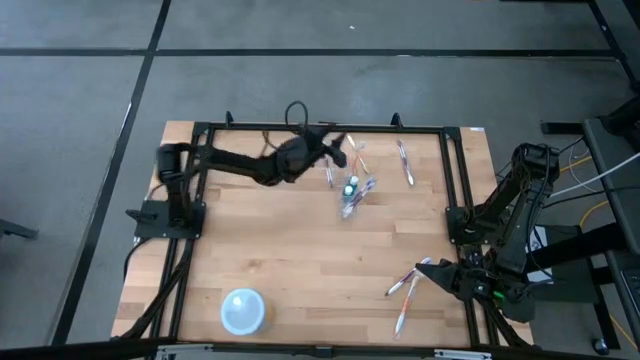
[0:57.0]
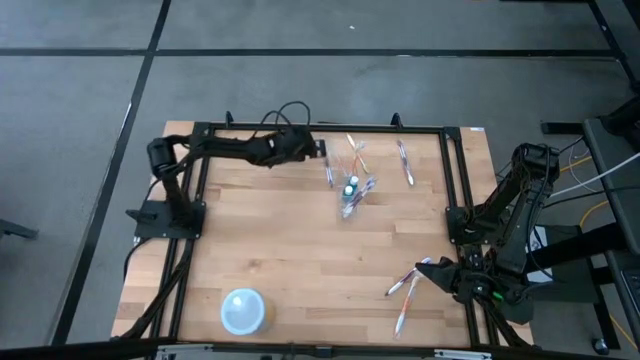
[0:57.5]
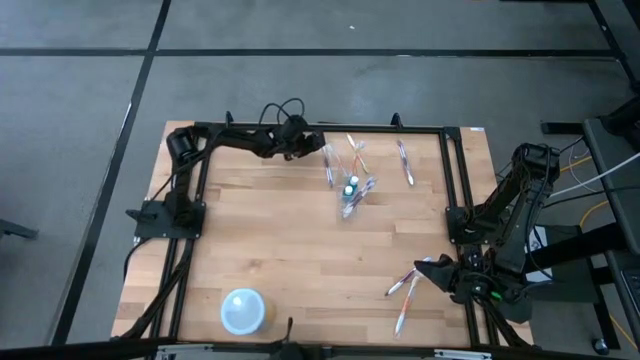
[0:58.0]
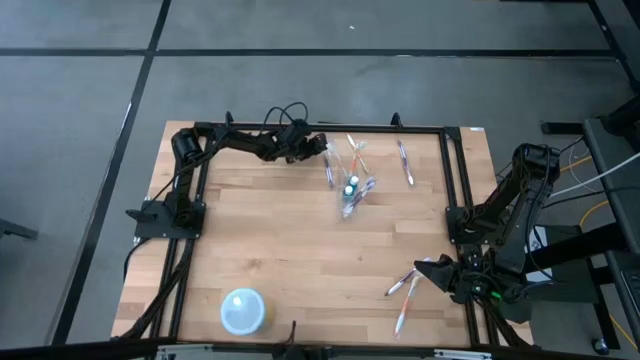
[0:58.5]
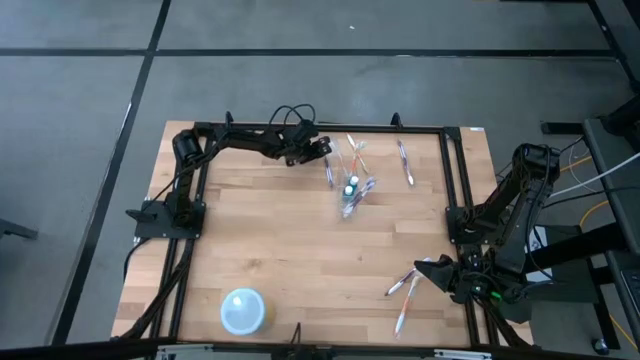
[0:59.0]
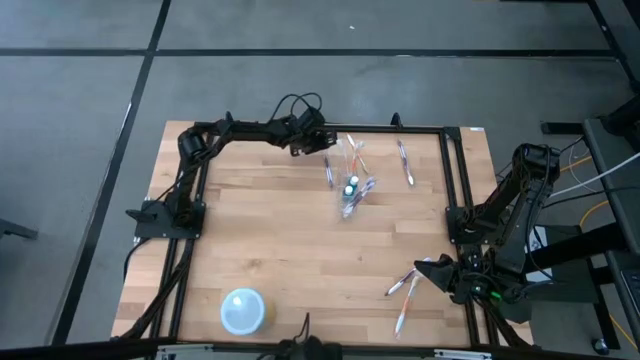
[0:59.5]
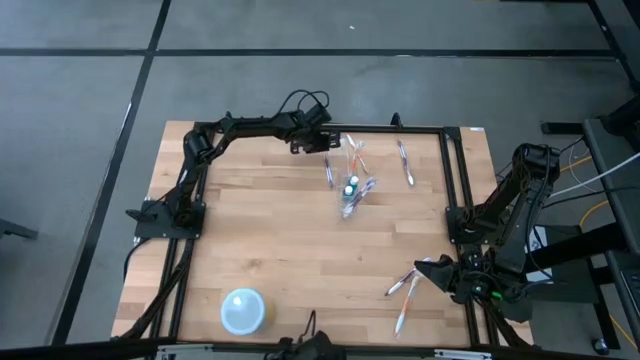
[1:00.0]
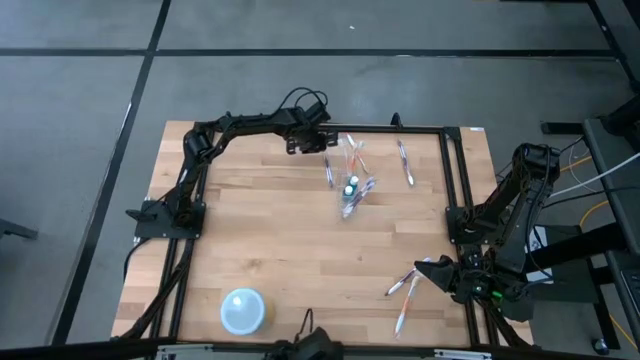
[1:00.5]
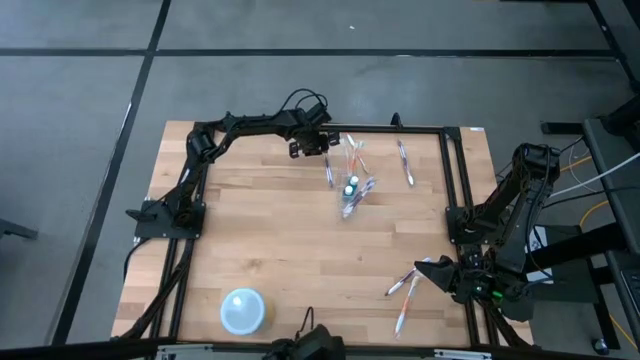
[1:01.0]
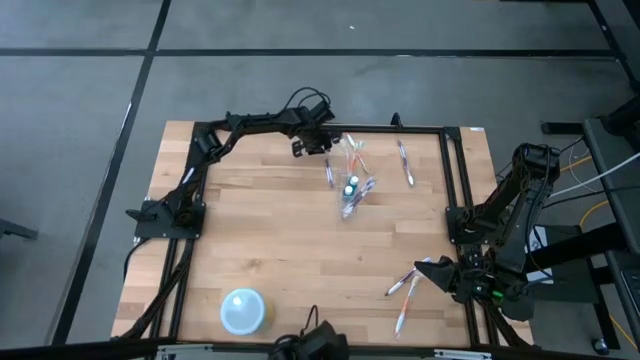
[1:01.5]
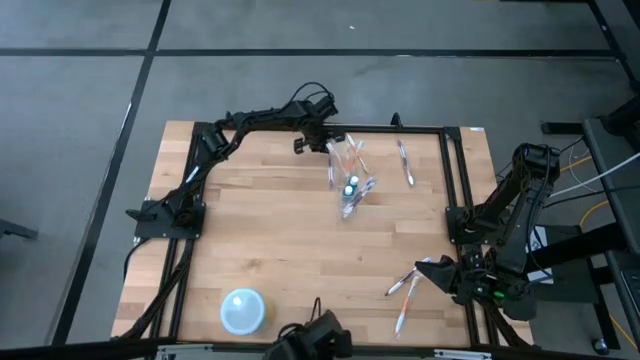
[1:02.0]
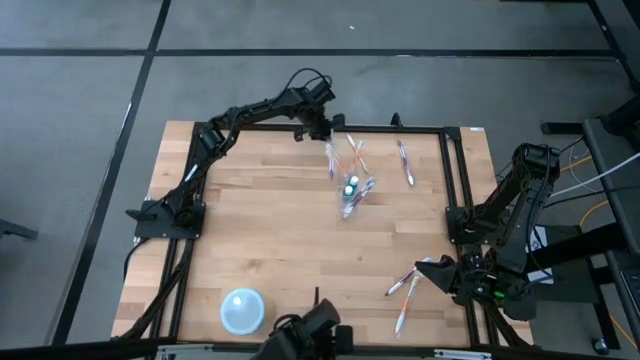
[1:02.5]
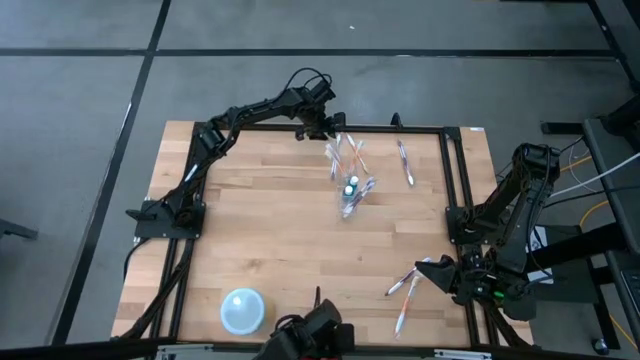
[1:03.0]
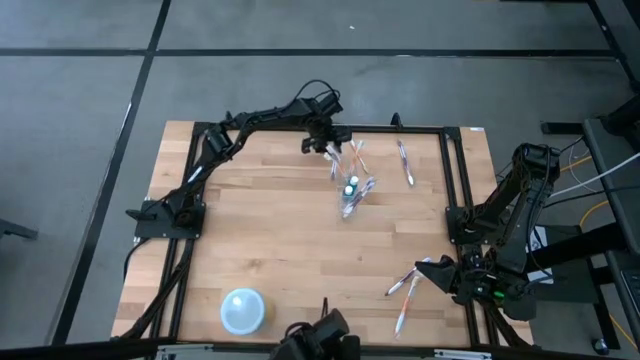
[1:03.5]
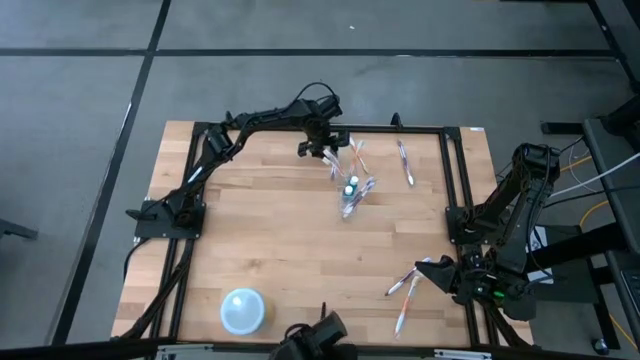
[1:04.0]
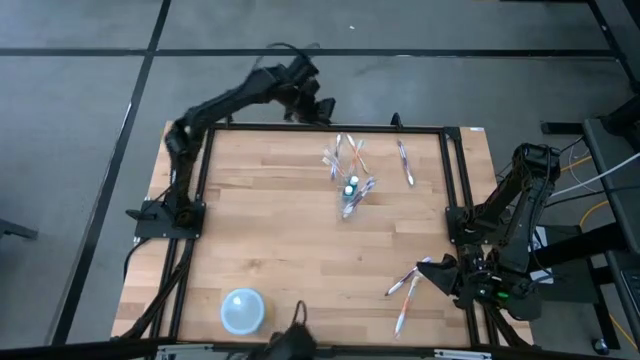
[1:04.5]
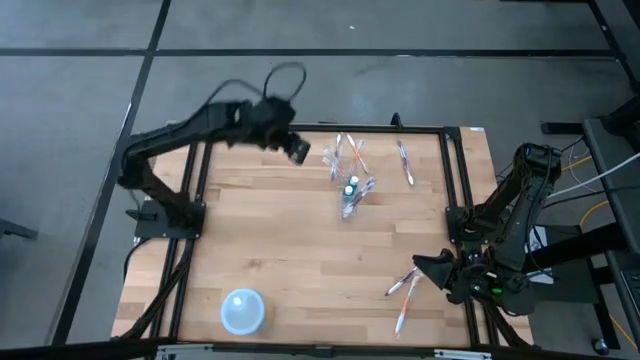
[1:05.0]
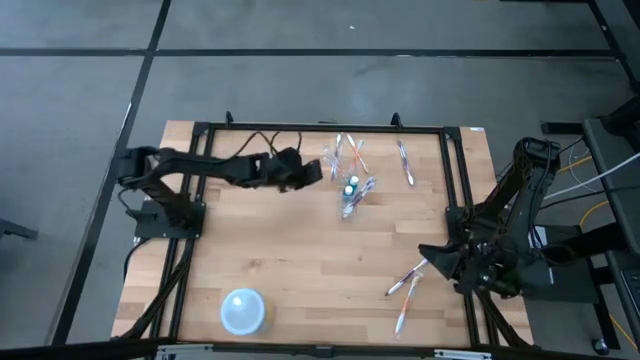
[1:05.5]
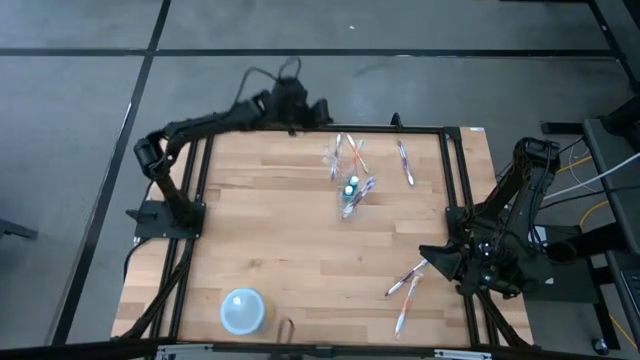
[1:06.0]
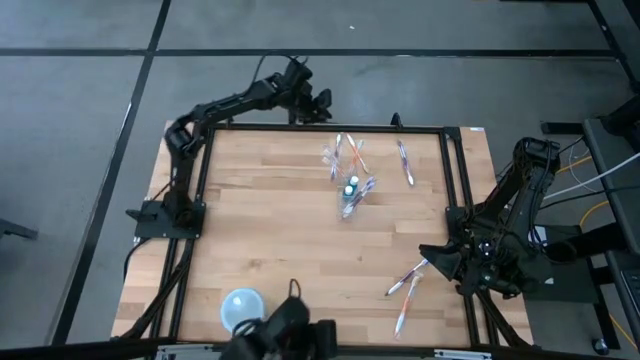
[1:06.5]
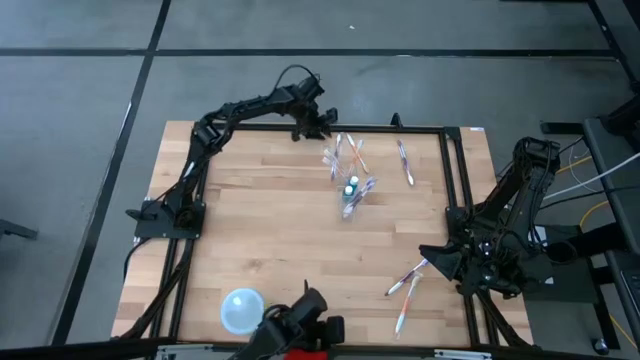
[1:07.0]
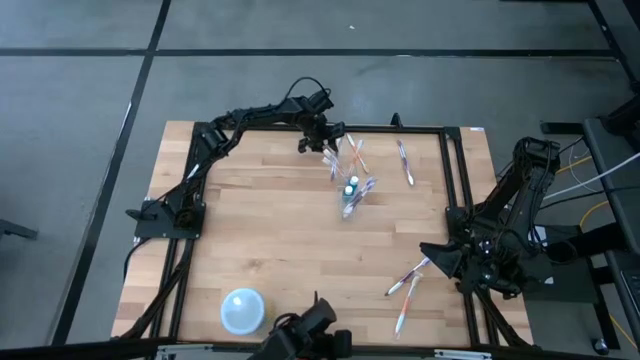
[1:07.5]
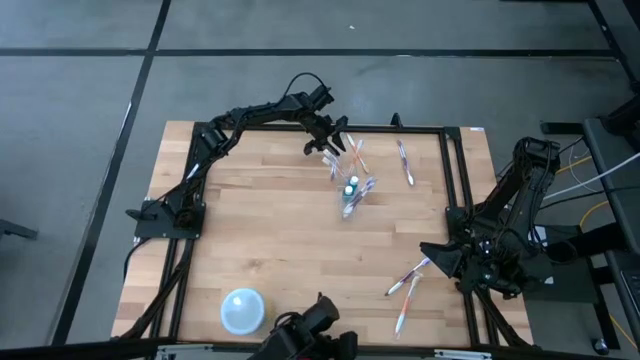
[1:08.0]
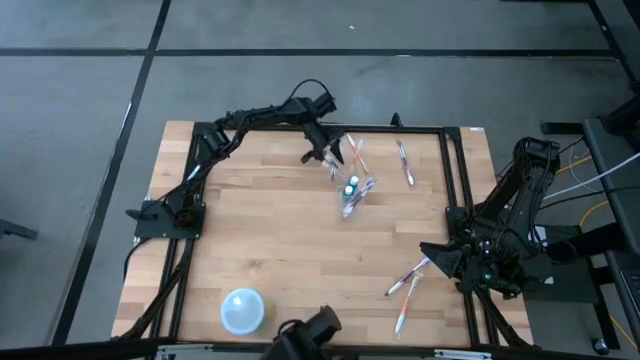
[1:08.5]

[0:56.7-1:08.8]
Task: Pick & Place toothbrushing station
Put the purple toothbrush into the transparent organizer

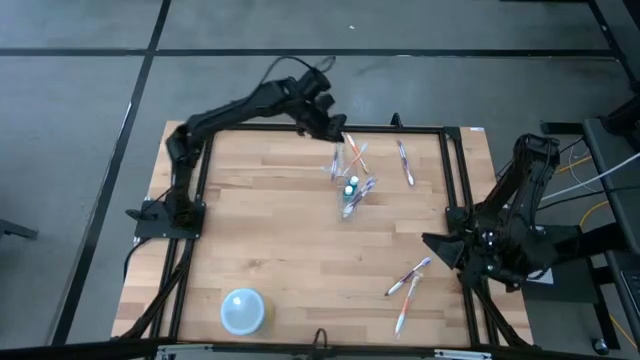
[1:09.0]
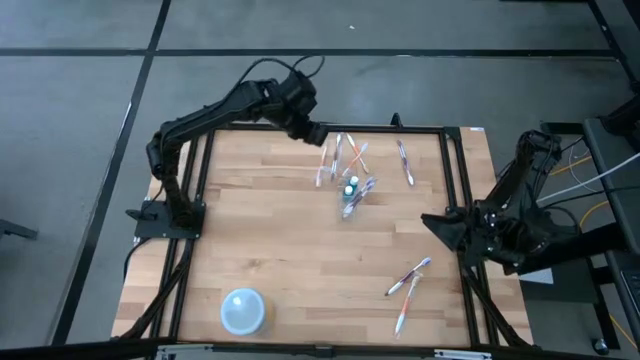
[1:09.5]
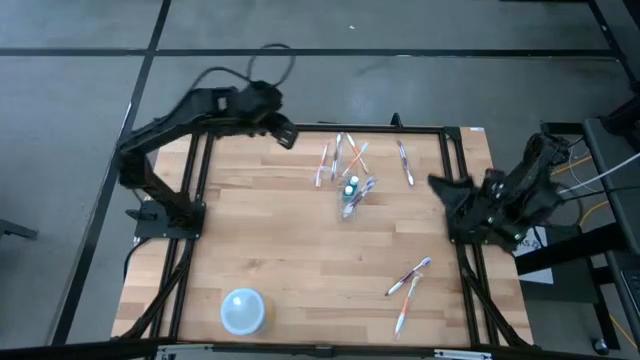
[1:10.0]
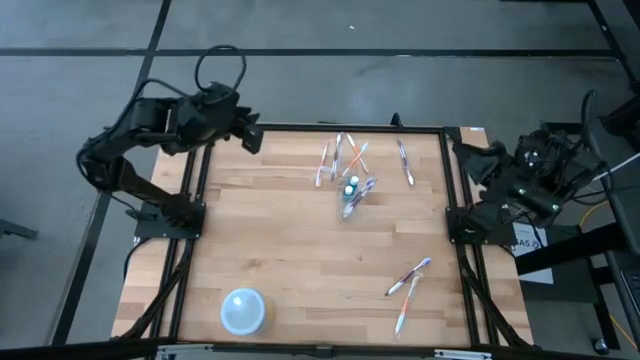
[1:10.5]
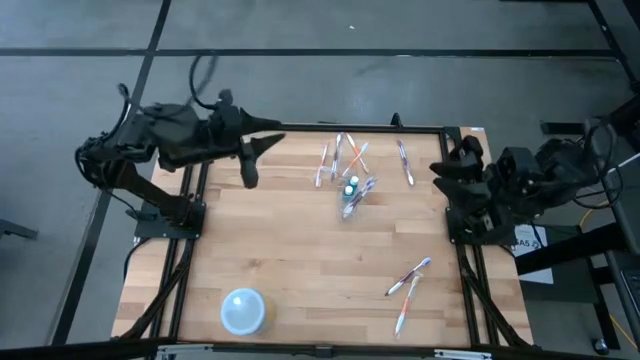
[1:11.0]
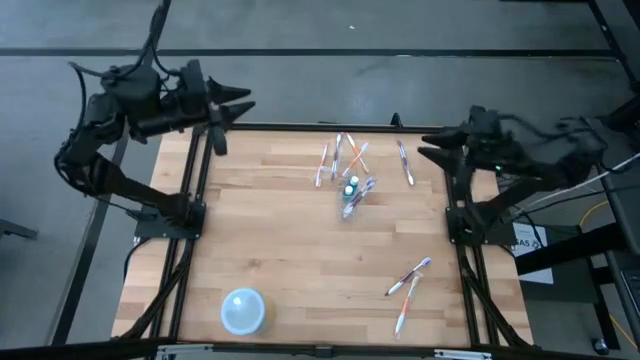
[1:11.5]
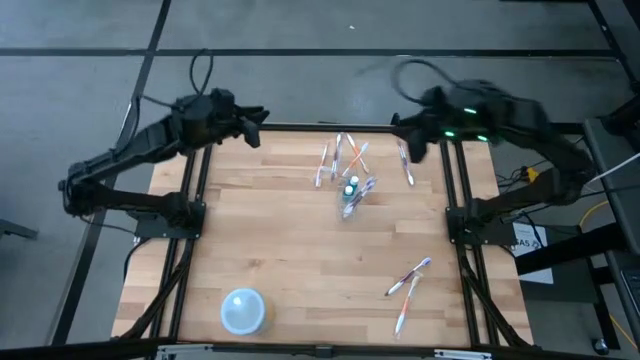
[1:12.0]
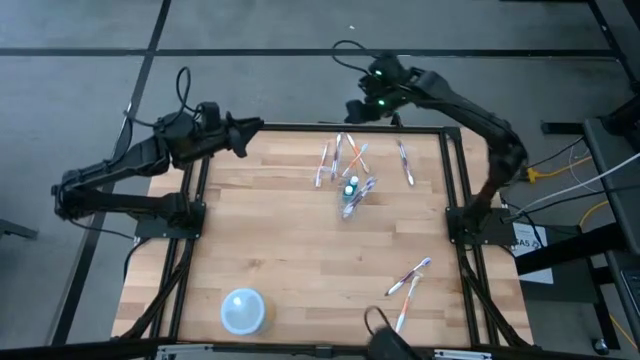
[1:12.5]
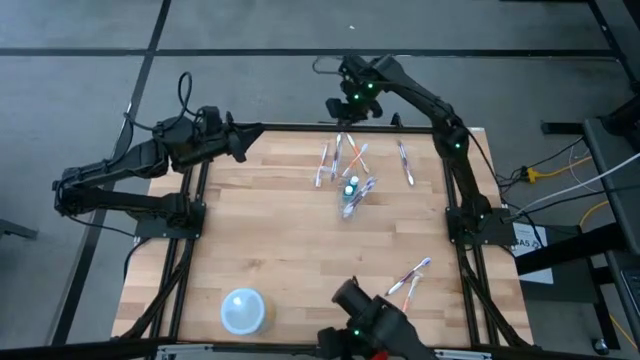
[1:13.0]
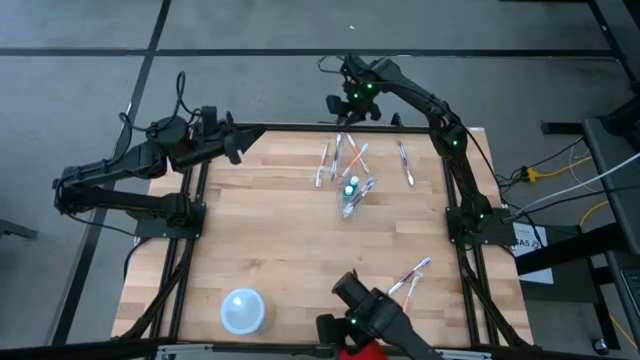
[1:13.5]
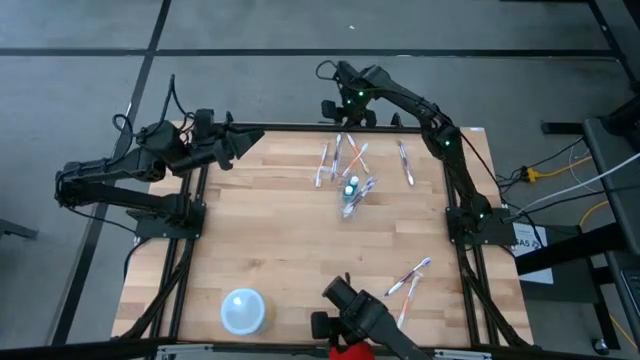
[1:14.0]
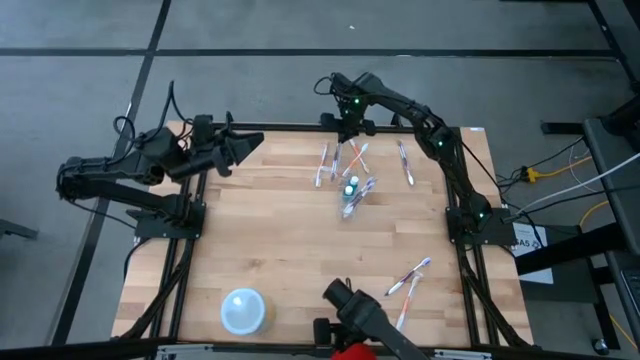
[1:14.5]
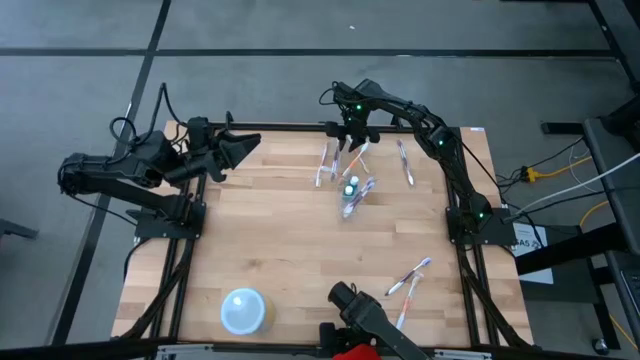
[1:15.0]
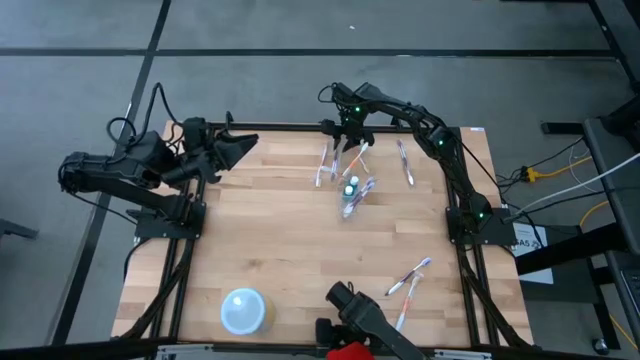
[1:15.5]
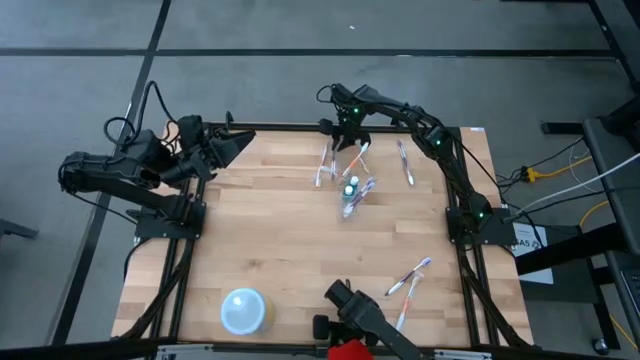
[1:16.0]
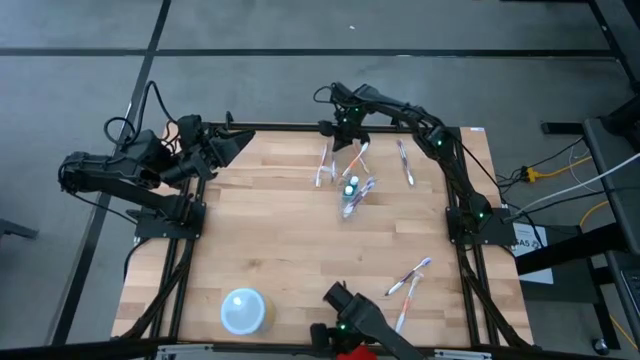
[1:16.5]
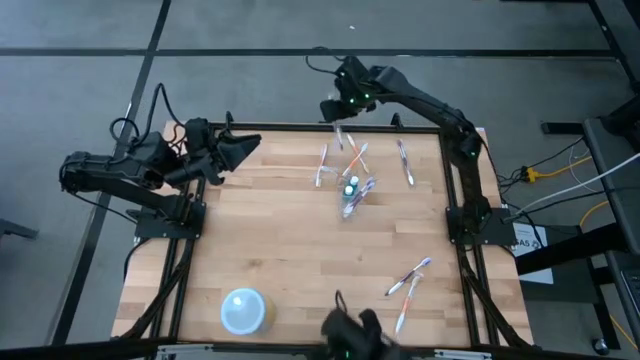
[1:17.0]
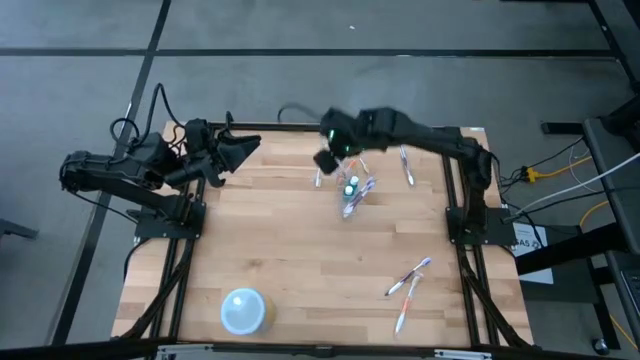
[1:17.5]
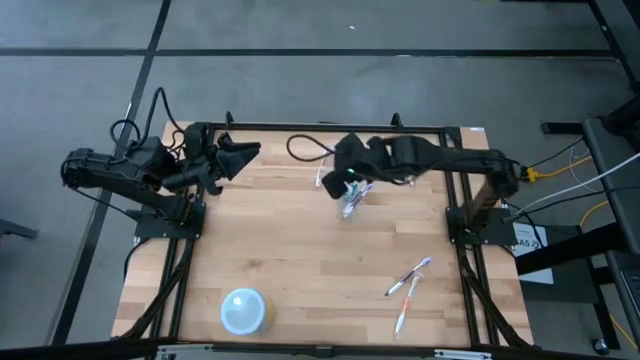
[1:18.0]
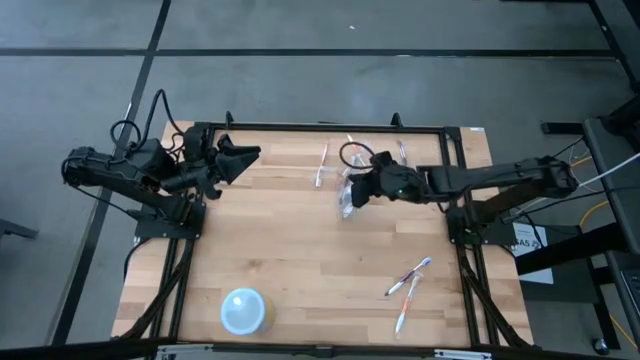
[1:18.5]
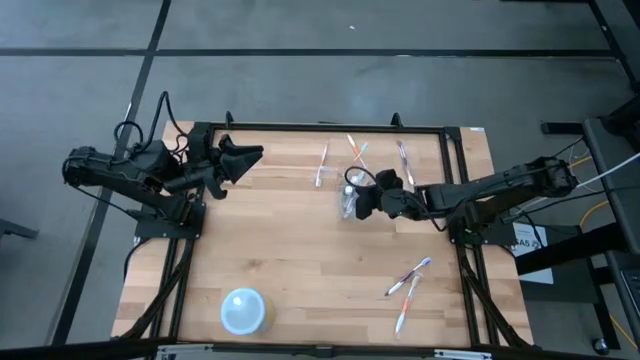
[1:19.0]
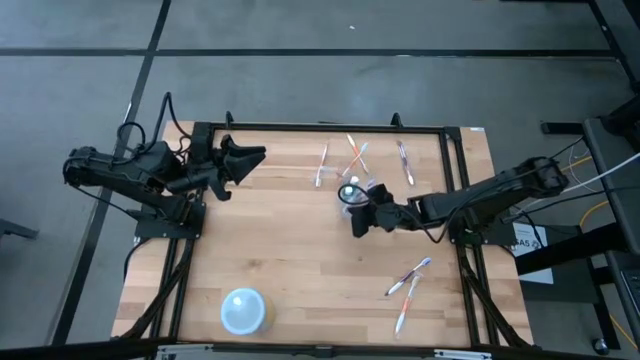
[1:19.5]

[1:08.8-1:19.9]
Put the purple toothbrush into the transparent organizer
